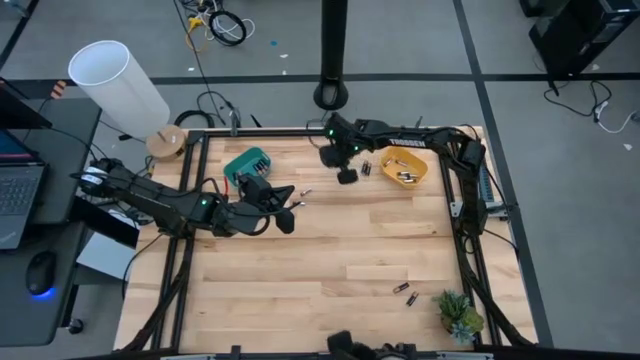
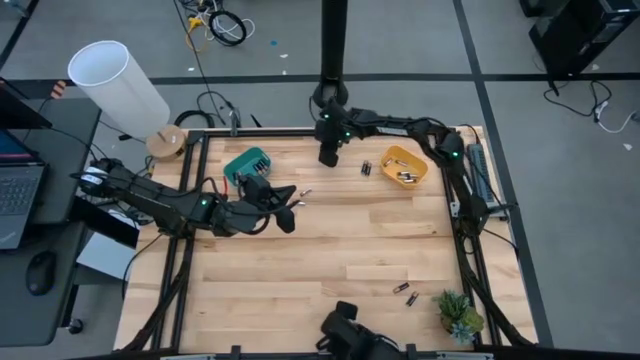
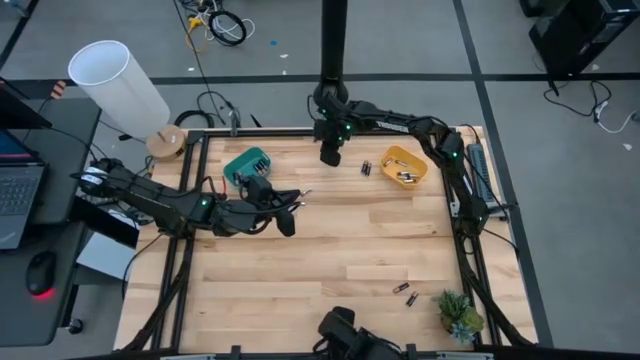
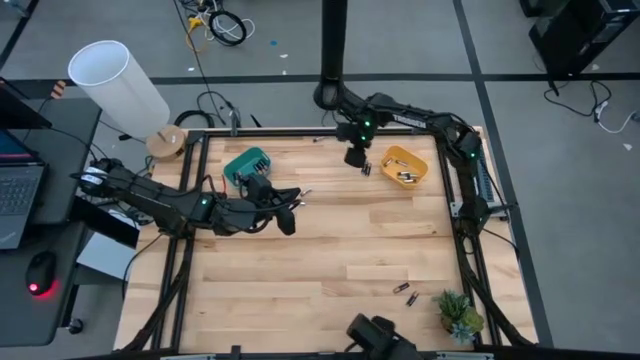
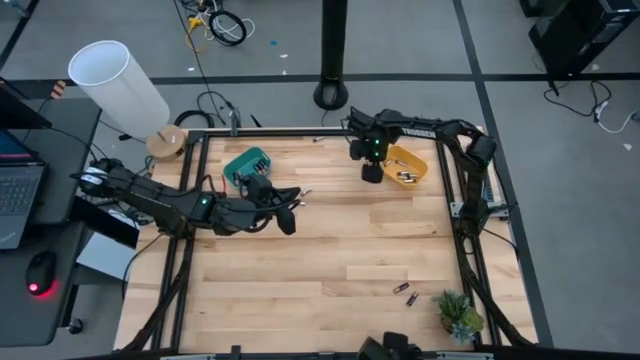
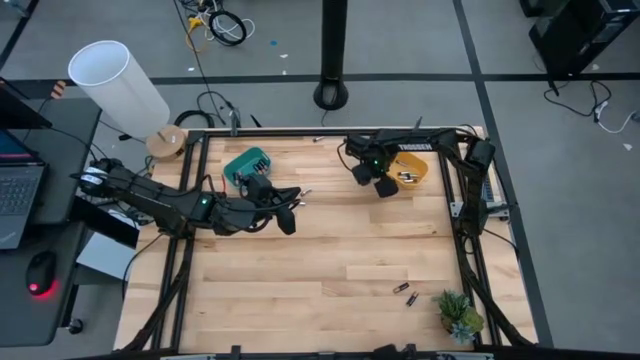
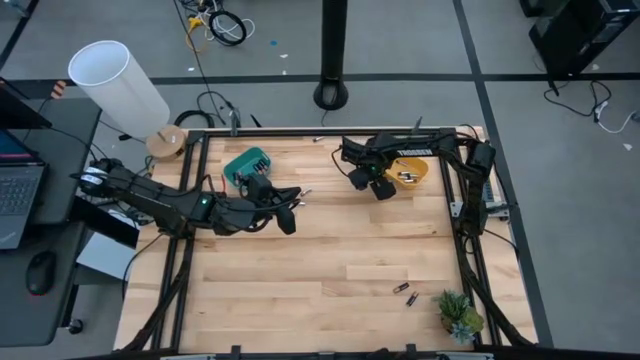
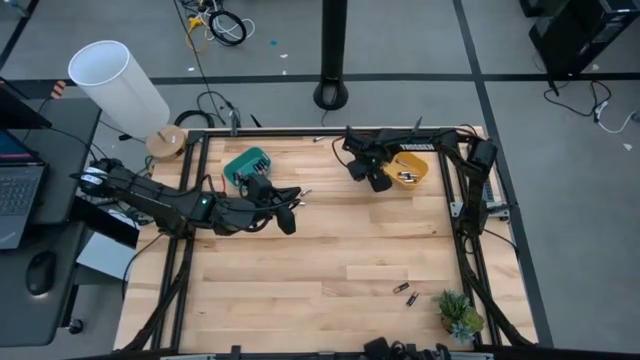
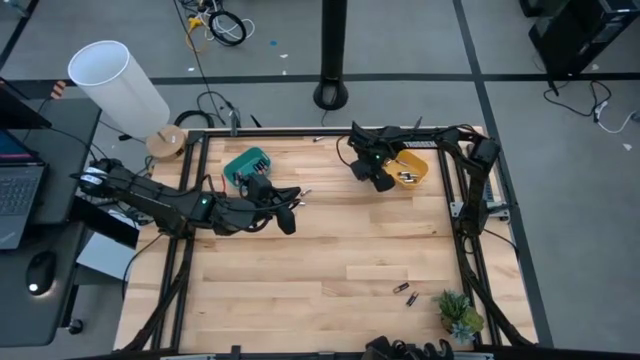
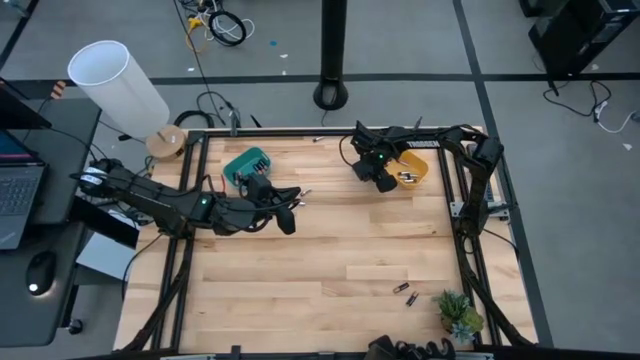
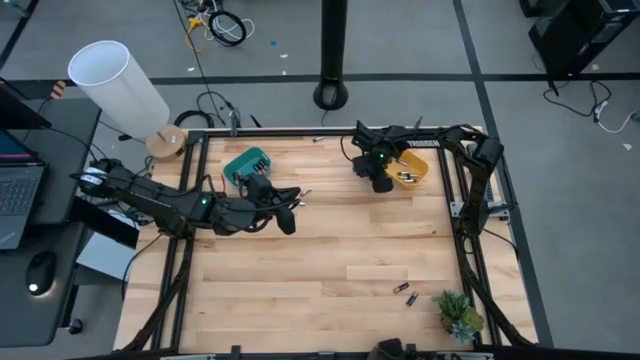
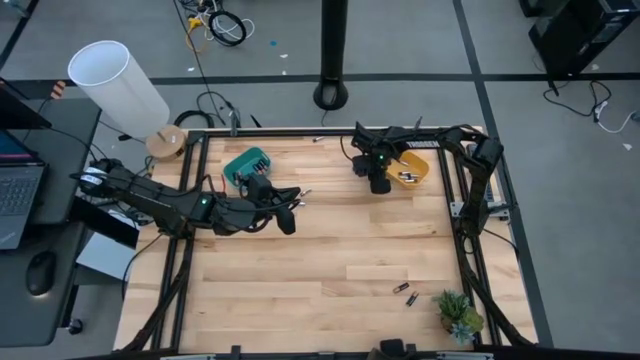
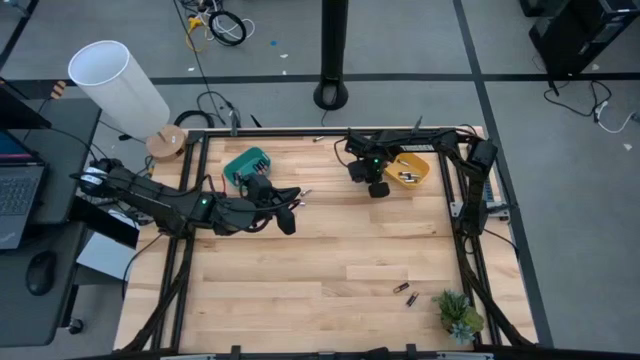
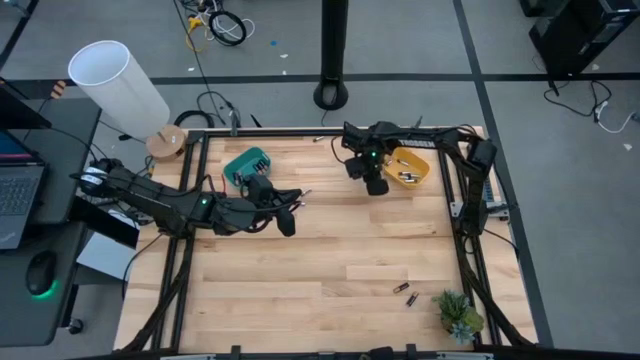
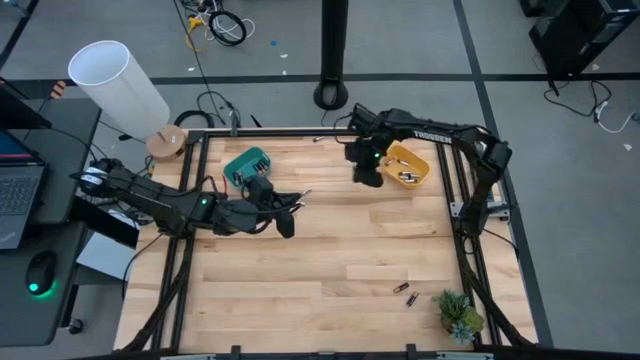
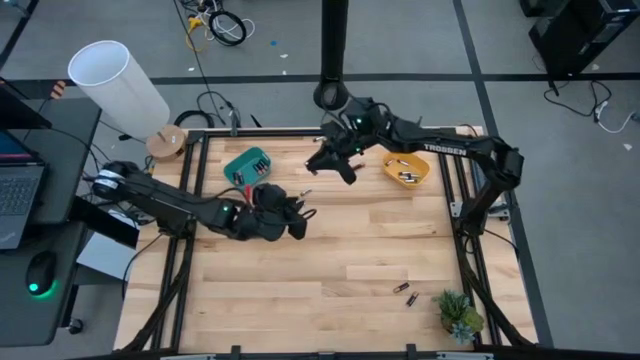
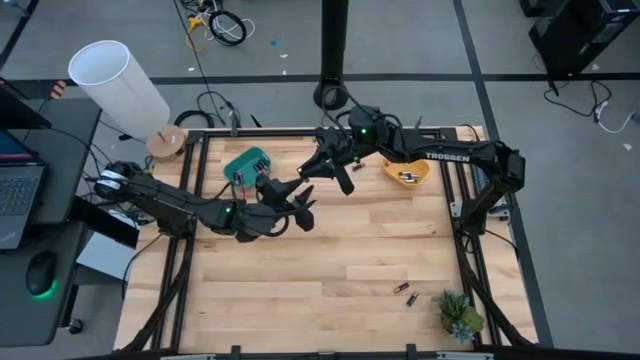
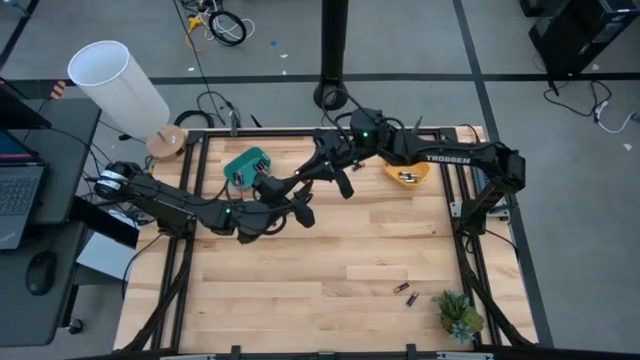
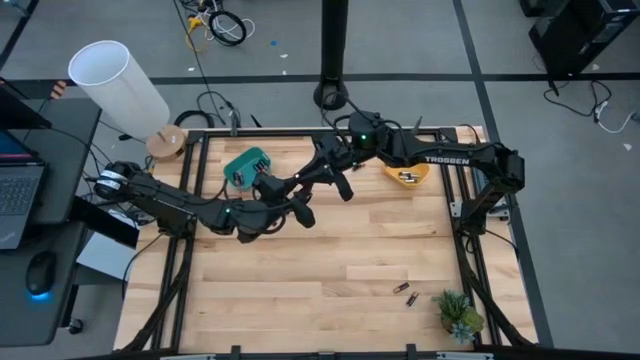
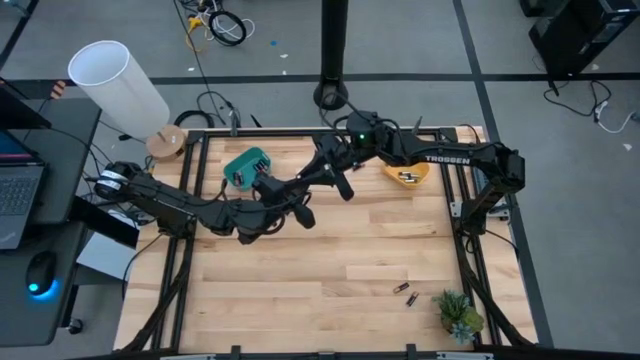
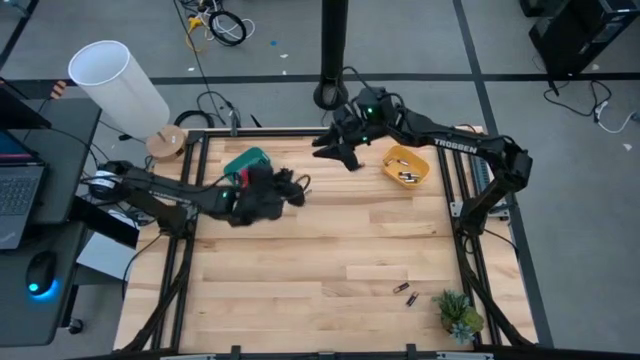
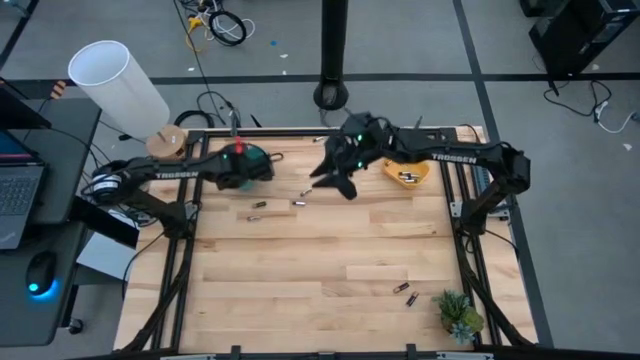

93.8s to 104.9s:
Task: Sort batteries
Put the black battery into the blue bin

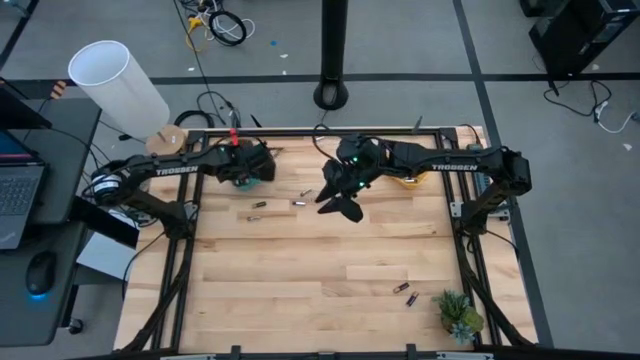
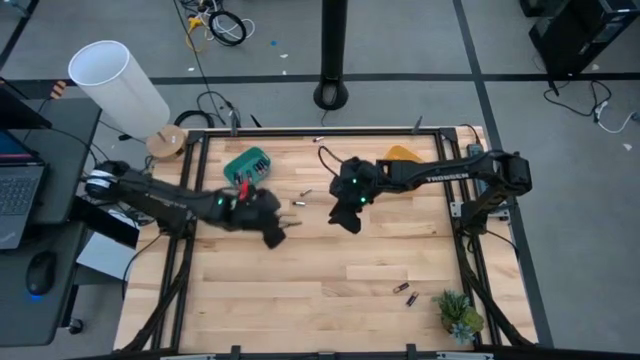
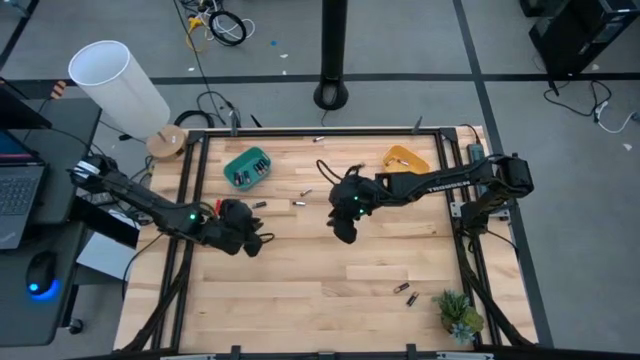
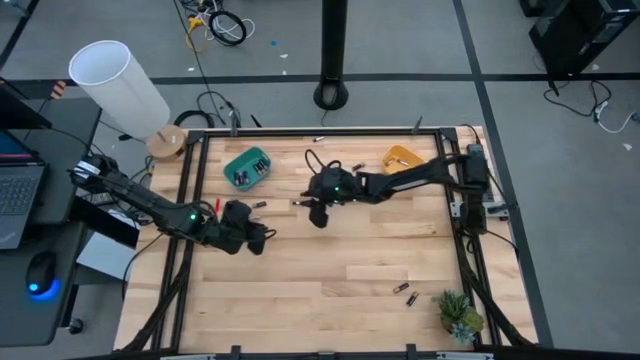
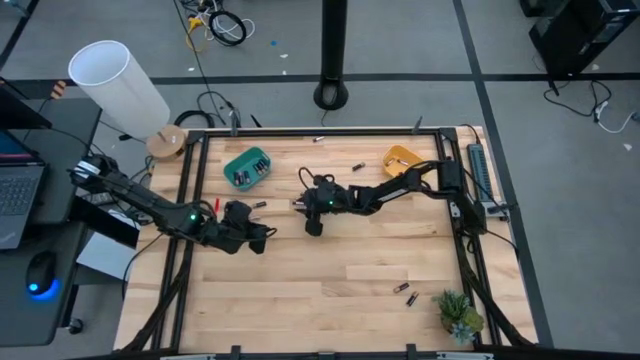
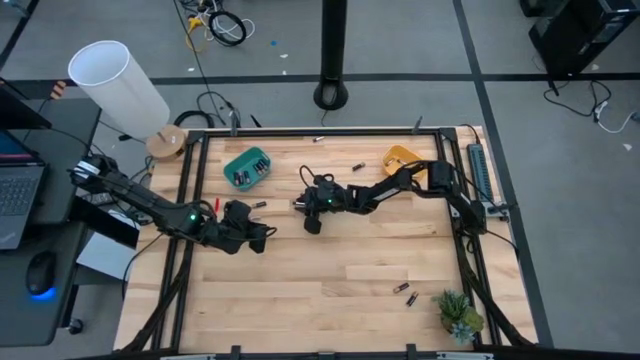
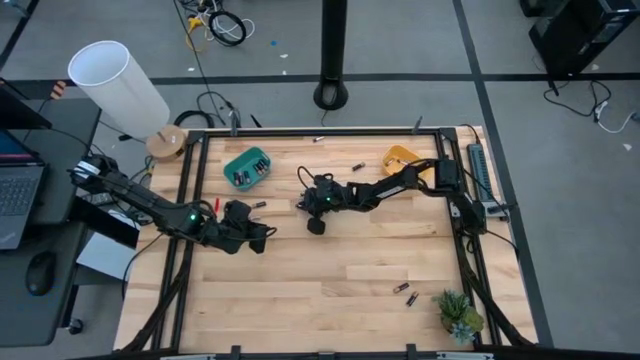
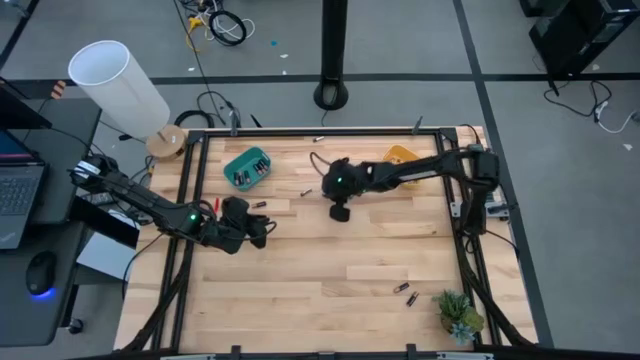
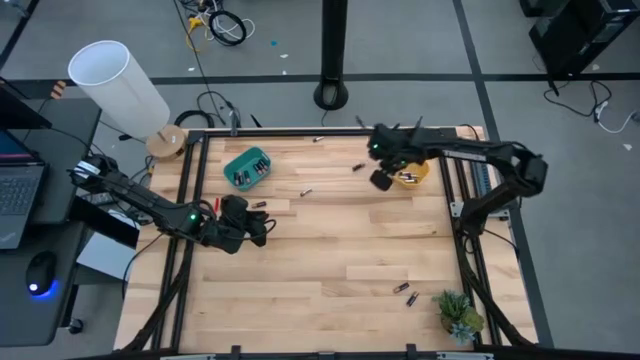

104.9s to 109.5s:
Put the silver battery into the yellow bin

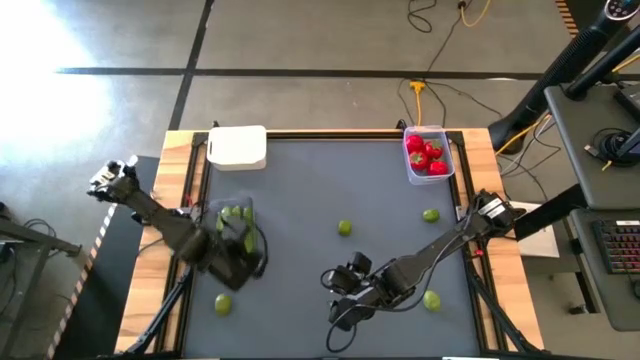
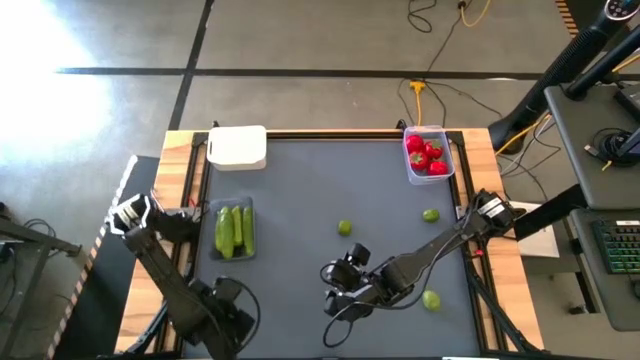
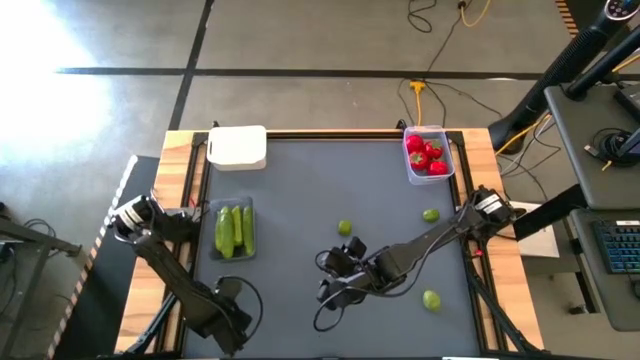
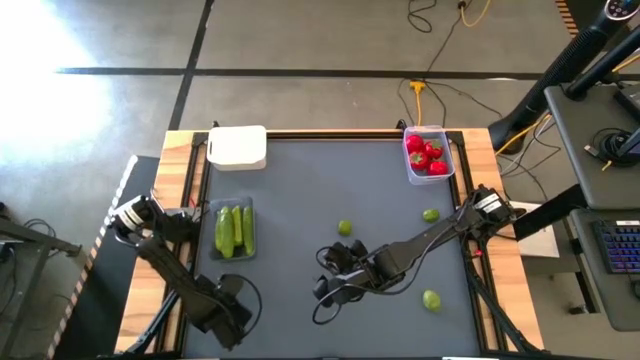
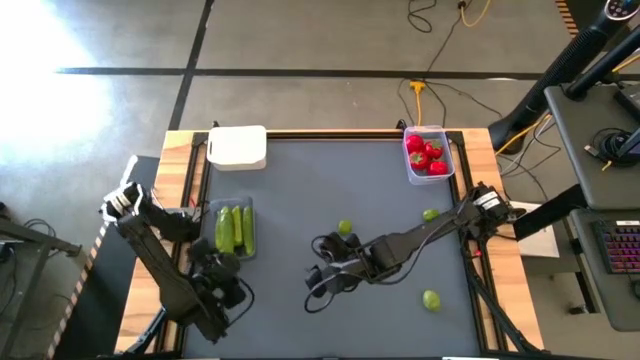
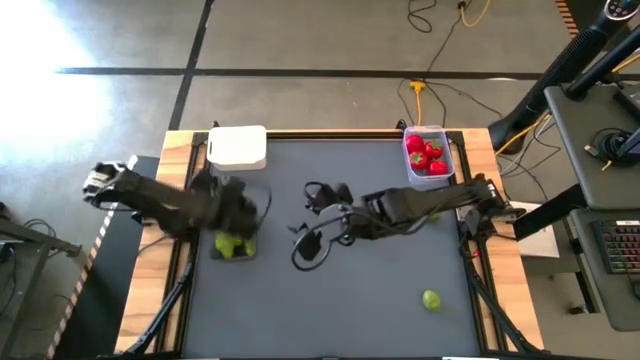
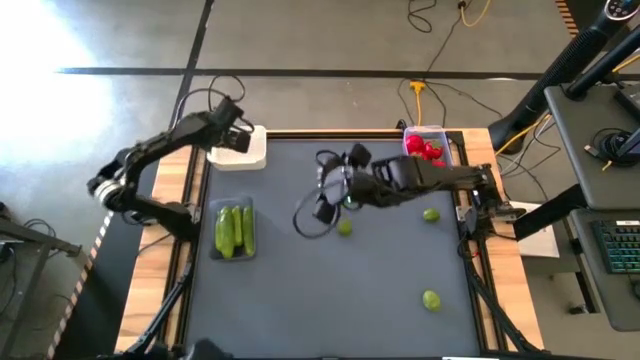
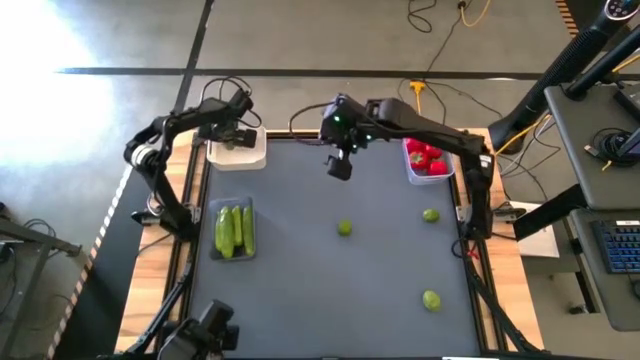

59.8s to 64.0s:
Task: Sort produce into baskets
Put the green lime into the white bin

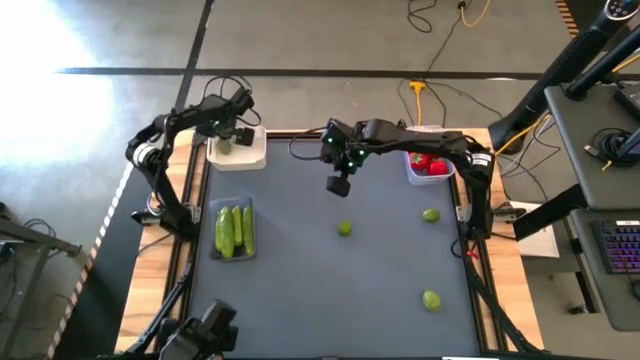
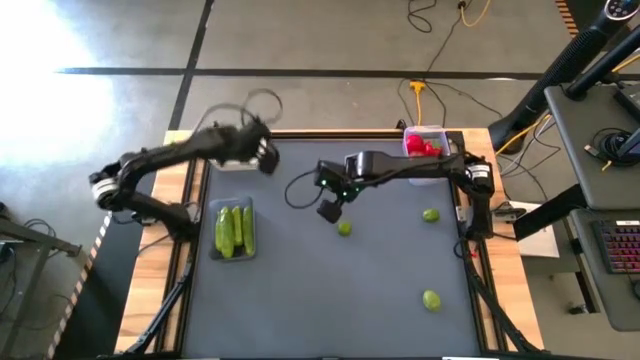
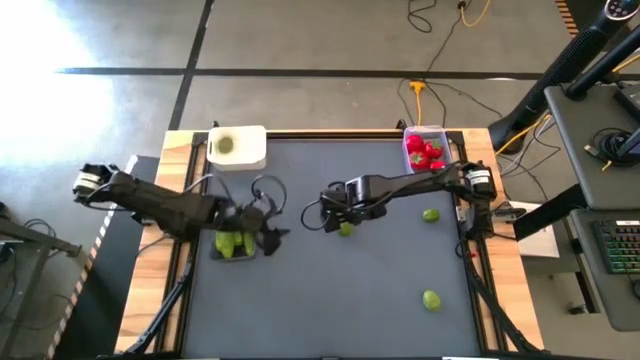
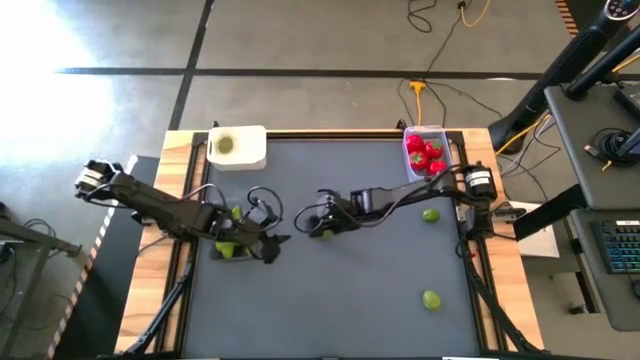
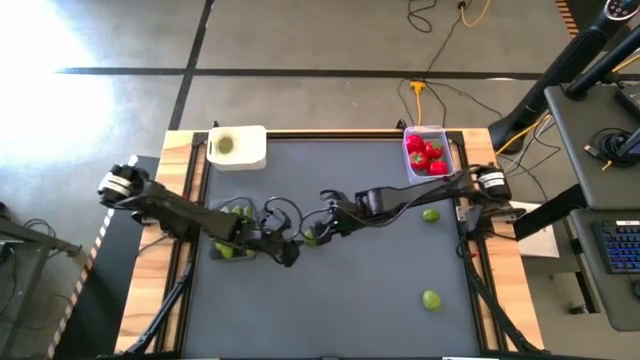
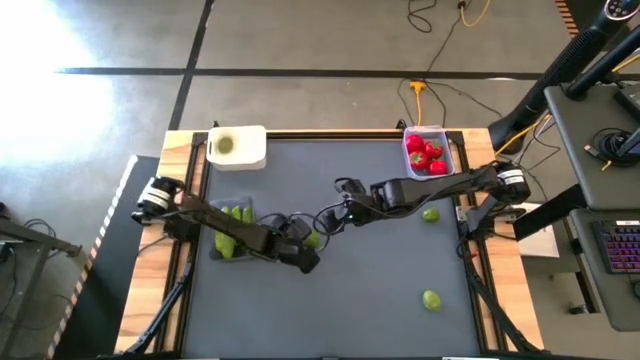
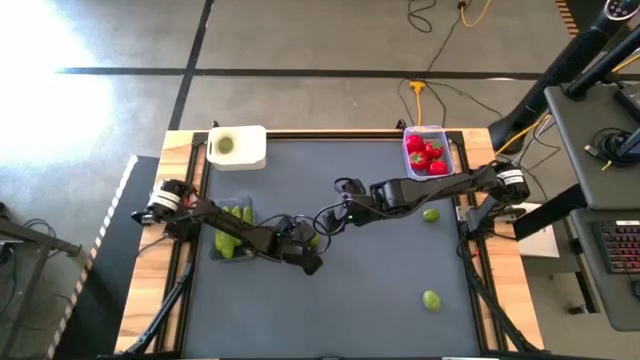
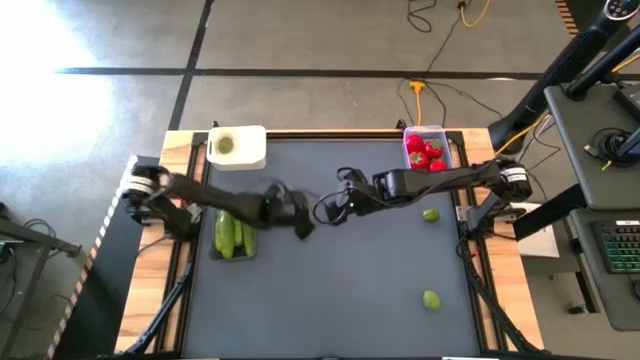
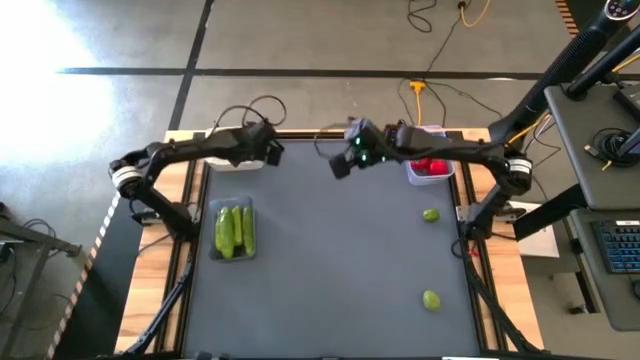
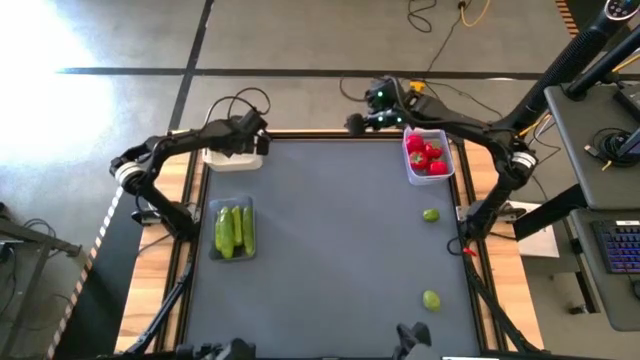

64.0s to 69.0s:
Put the green lime into the white bin
